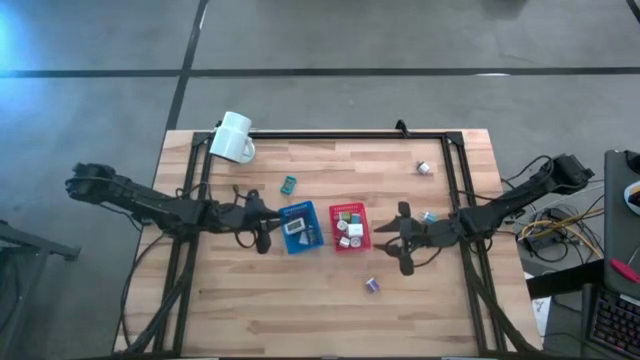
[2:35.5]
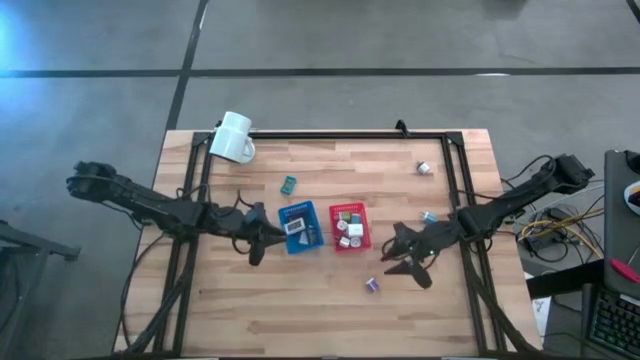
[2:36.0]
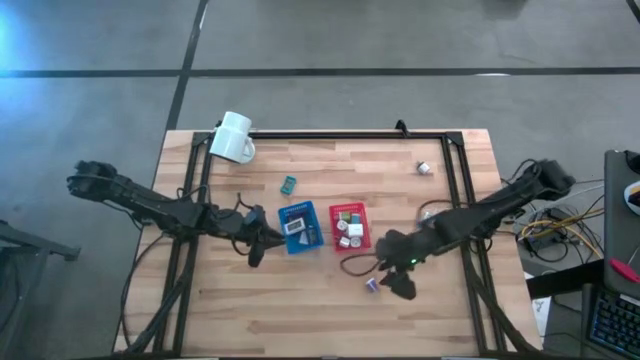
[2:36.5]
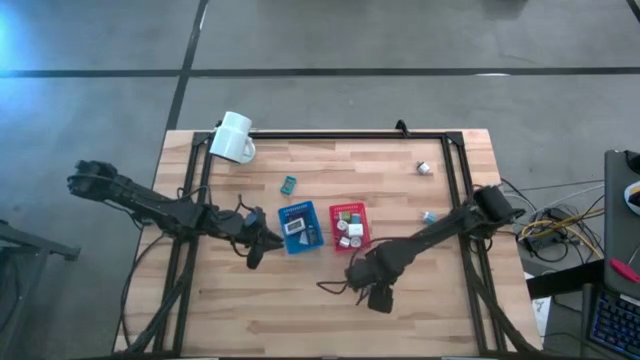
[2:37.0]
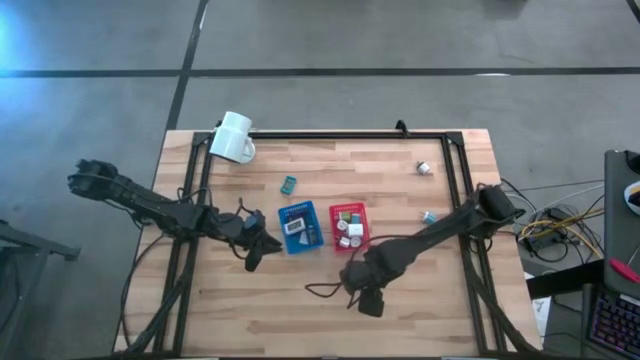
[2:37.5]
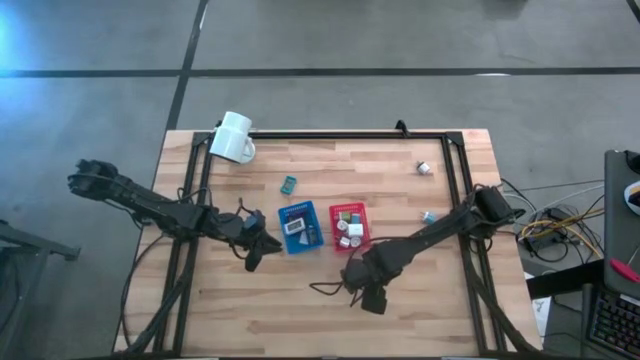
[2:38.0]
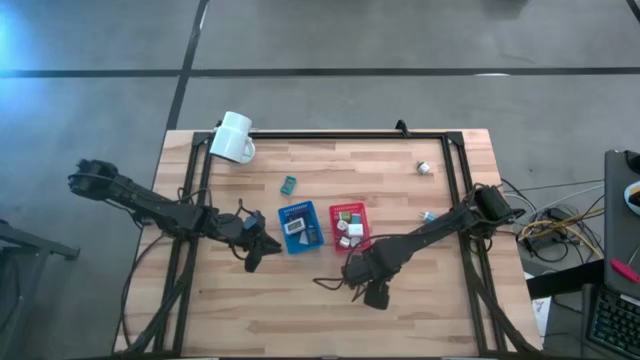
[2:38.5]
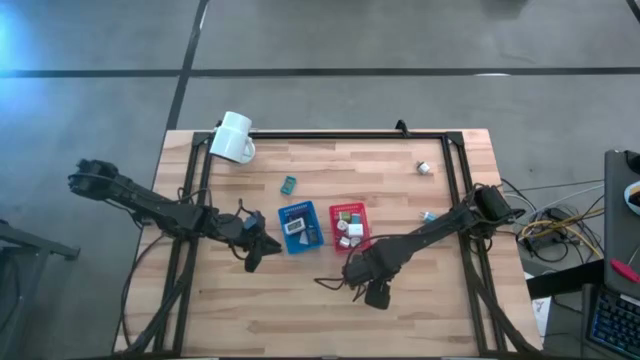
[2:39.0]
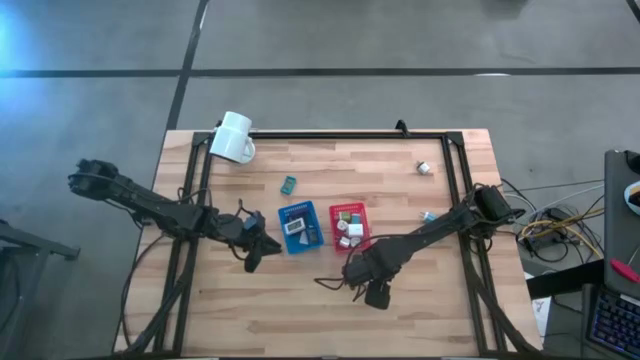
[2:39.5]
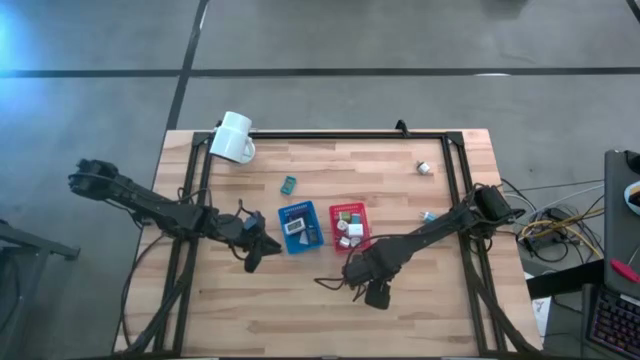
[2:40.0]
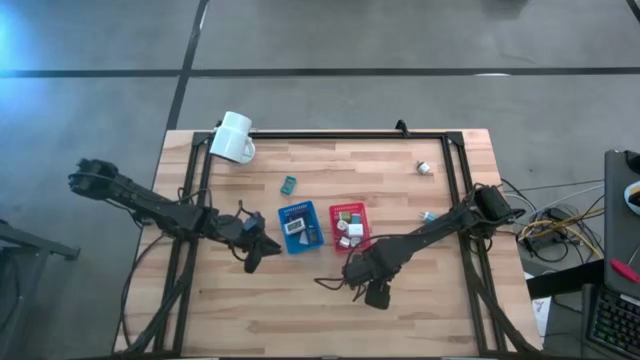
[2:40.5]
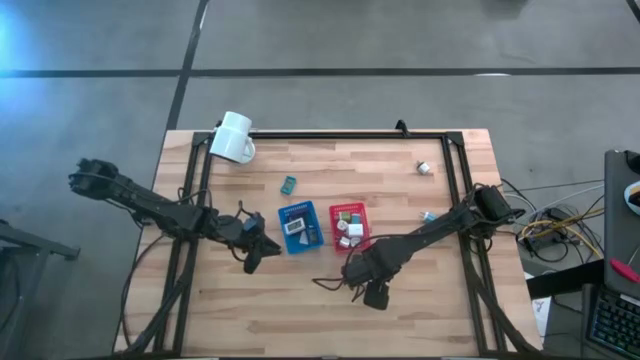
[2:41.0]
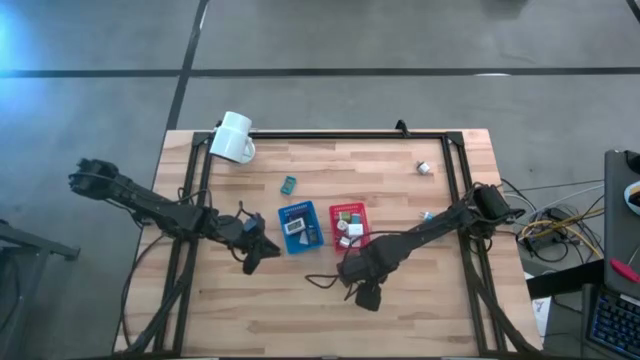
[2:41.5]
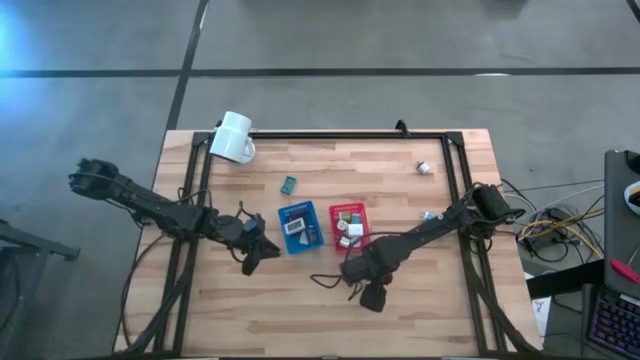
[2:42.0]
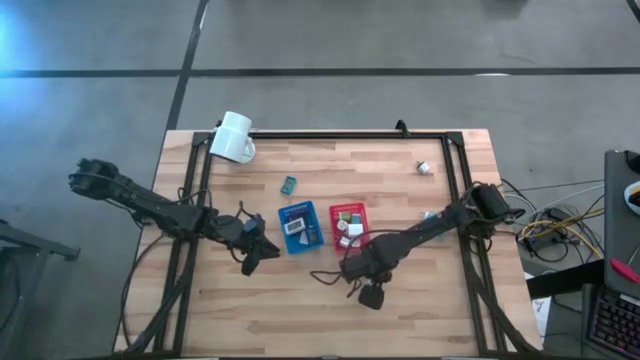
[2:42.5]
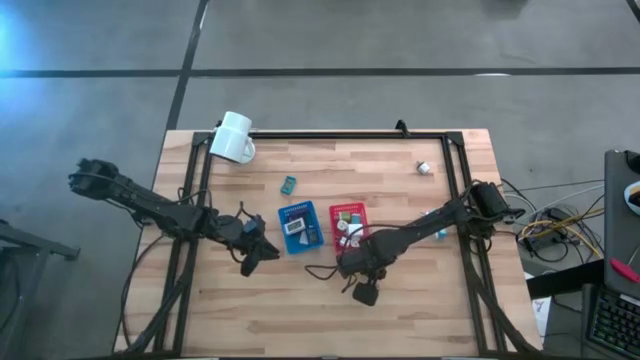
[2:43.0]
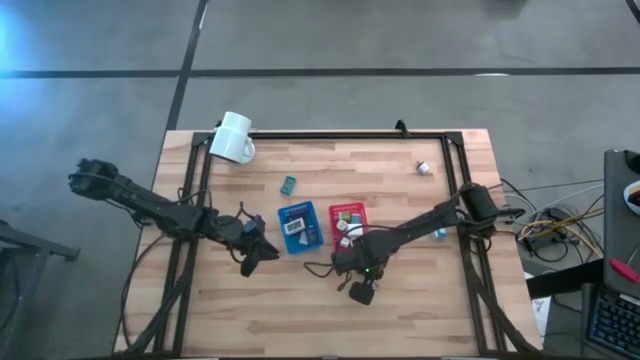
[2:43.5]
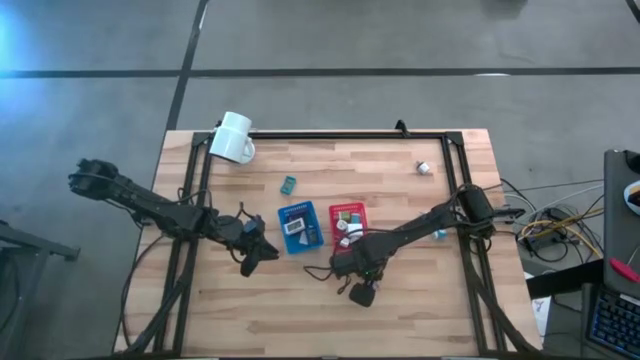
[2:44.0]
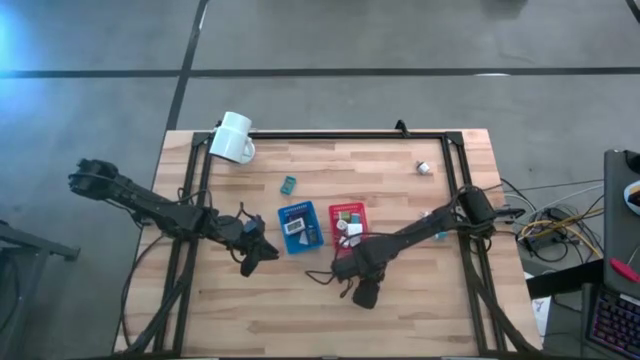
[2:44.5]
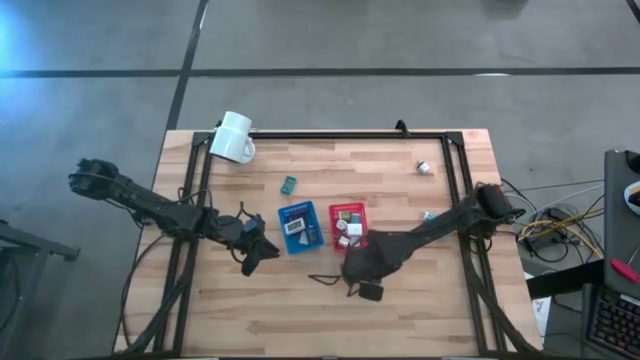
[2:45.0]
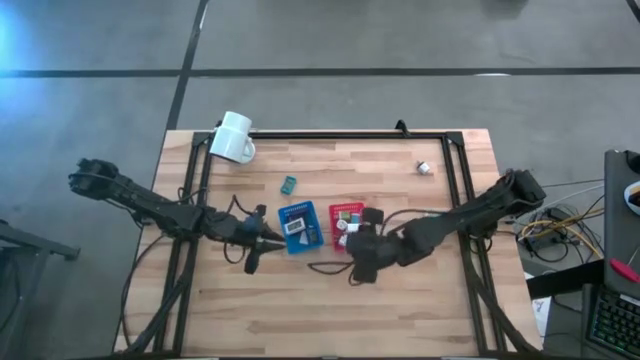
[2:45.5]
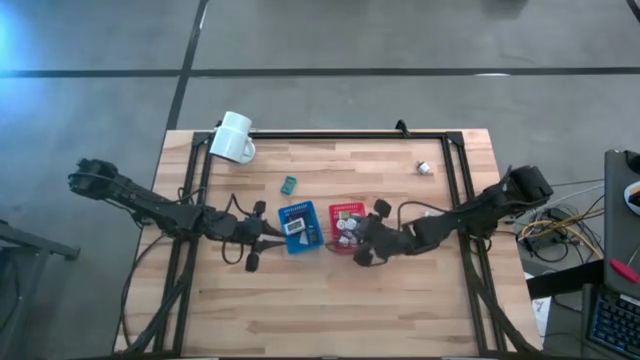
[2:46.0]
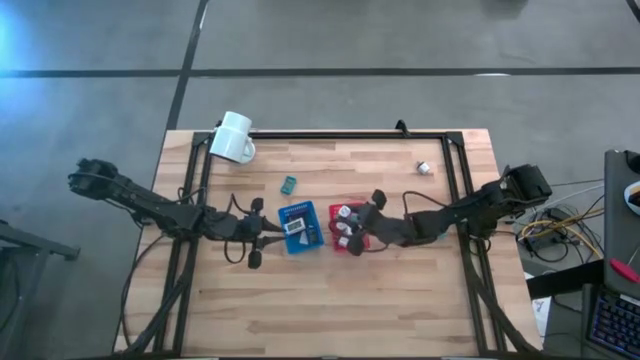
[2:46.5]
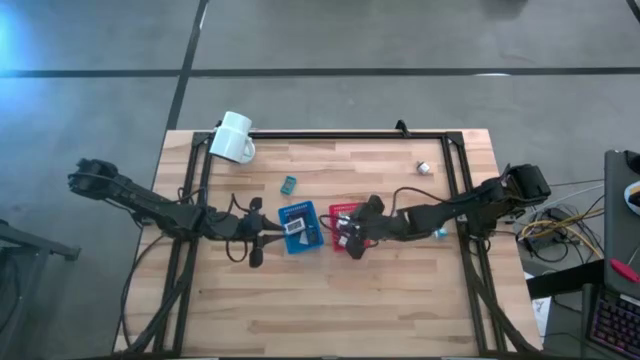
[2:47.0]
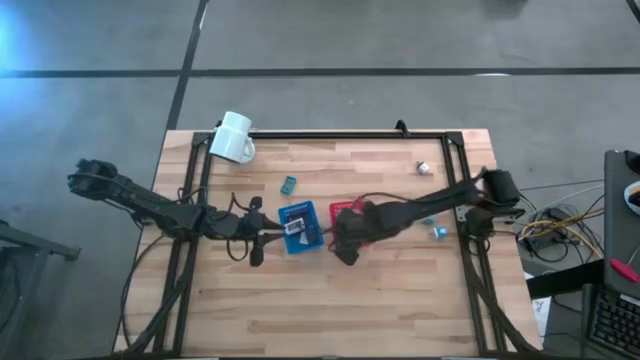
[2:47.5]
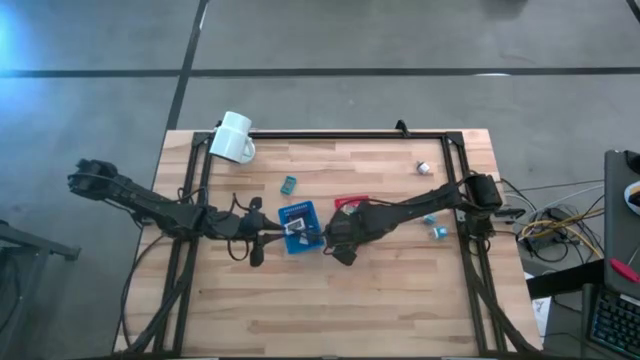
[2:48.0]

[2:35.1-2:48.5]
Task: Pick & Place Office items
Put the violet charger adapter into the red bin

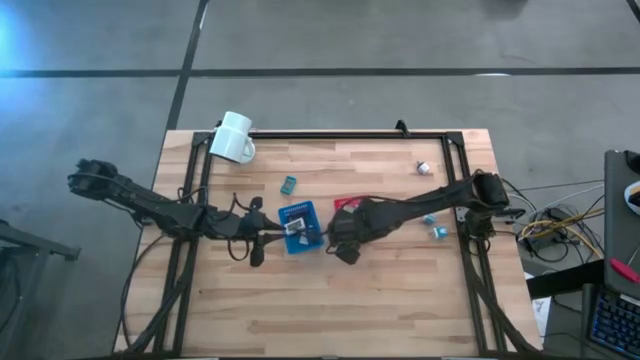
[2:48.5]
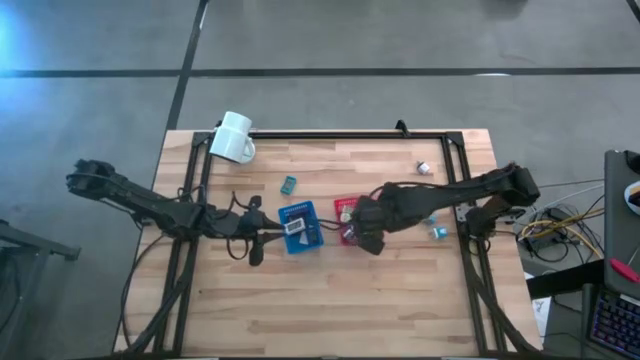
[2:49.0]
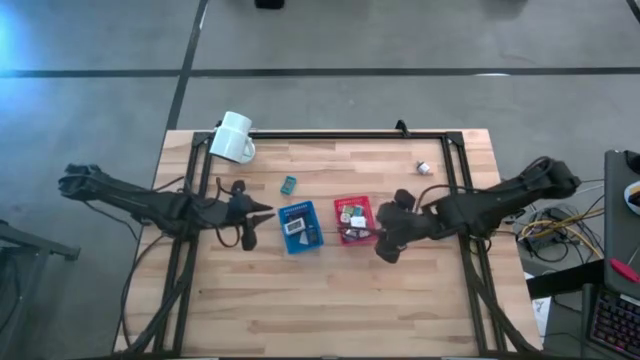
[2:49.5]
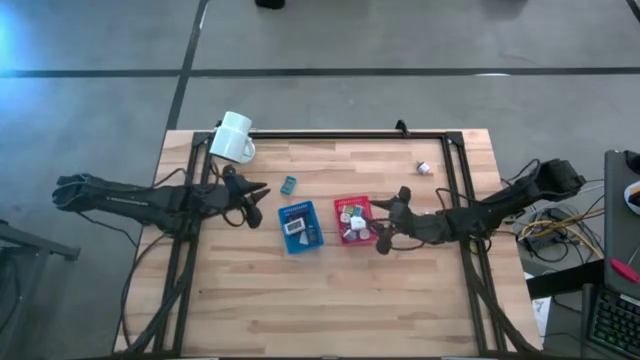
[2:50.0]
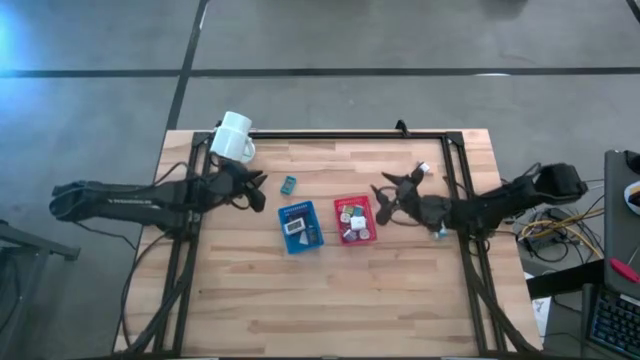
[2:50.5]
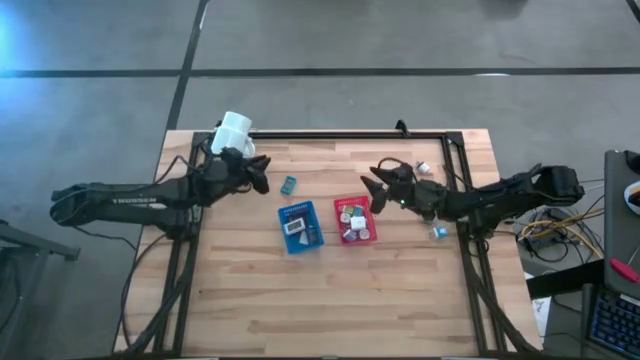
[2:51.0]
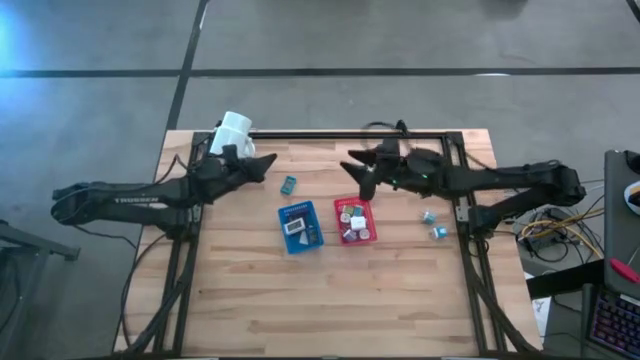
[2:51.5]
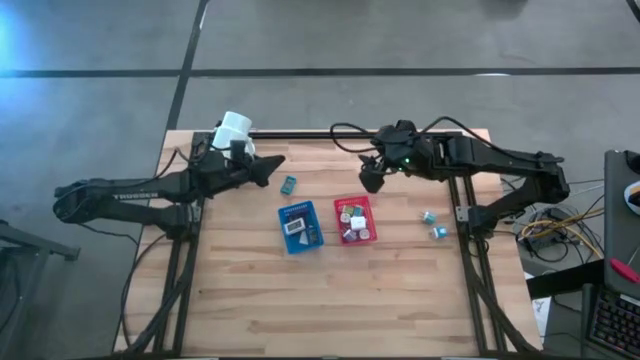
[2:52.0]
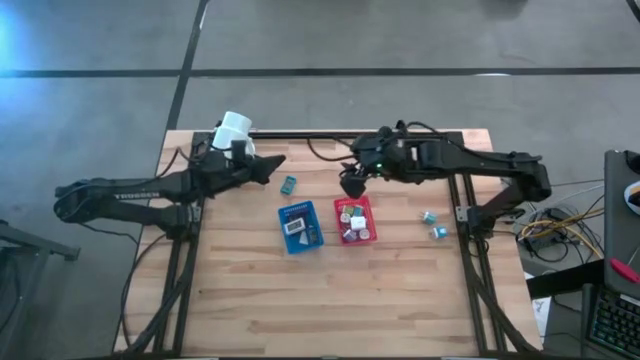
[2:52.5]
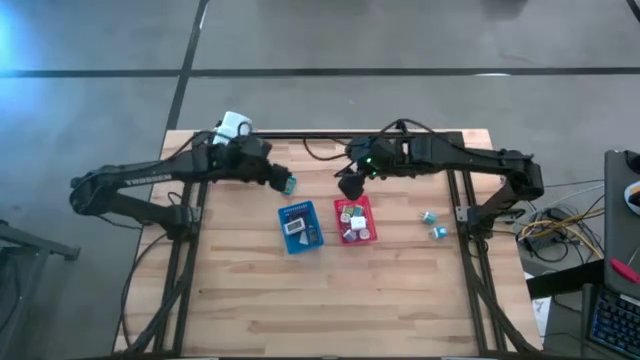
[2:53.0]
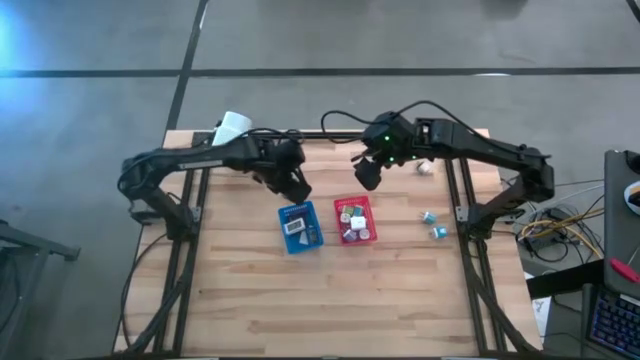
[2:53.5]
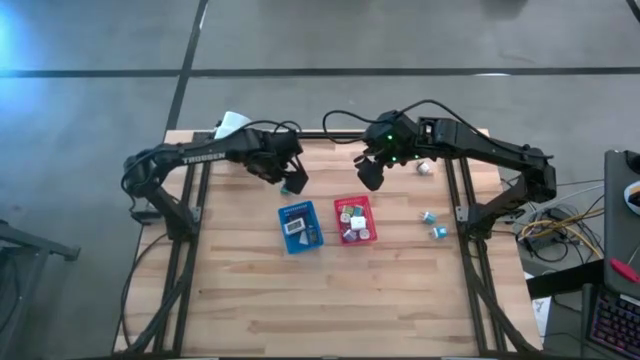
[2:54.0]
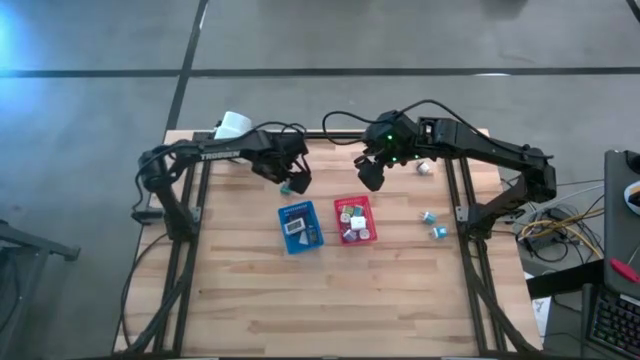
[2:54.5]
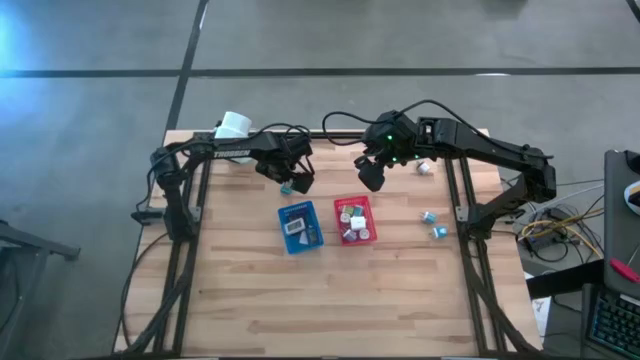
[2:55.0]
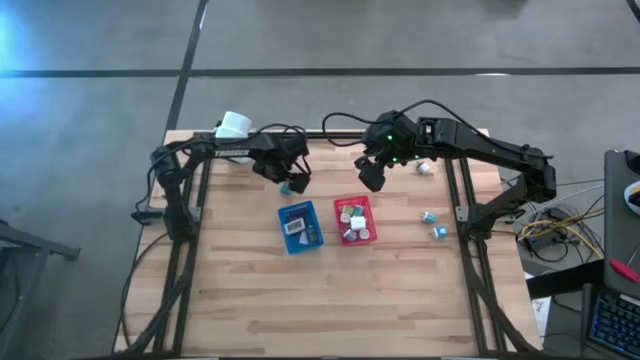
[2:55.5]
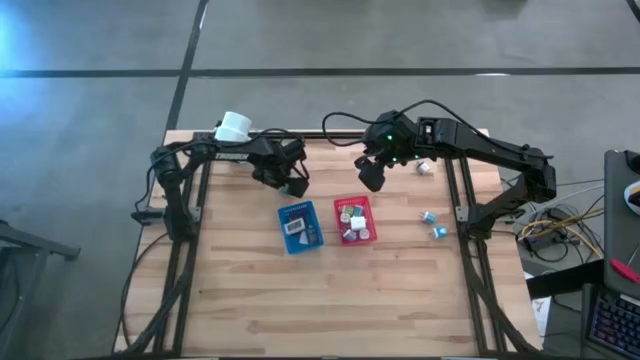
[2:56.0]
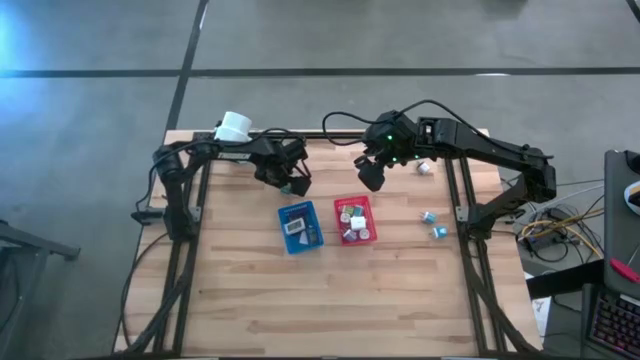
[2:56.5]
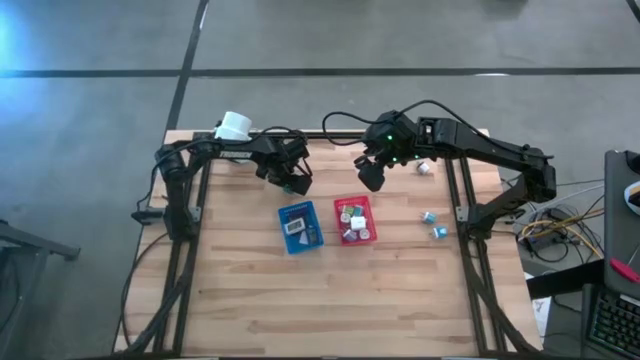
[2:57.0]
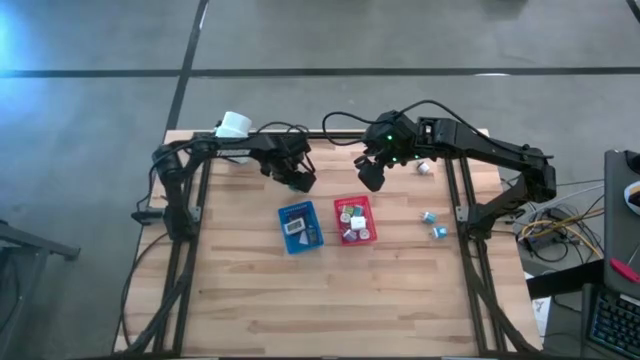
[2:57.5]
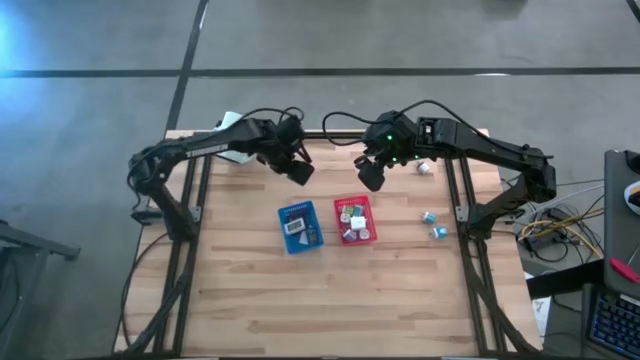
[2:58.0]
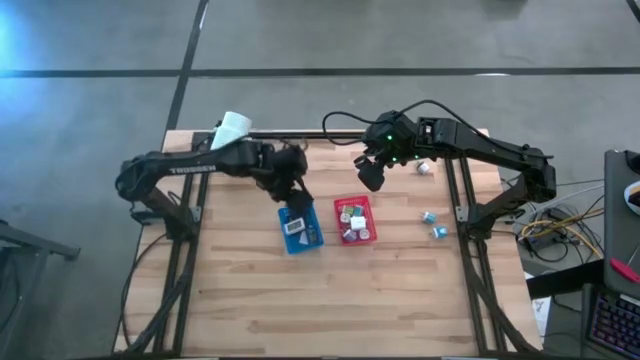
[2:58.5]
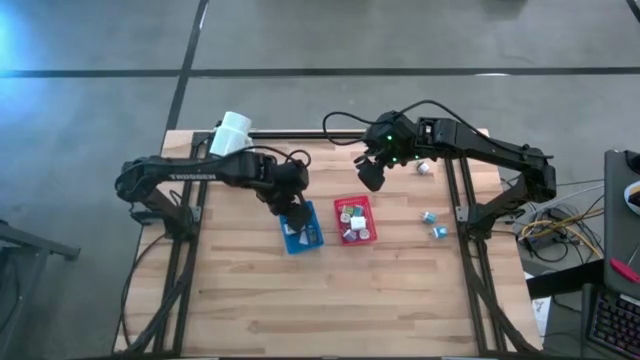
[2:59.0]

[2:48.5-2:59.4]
Put the light blue digital clock into the blue bin
